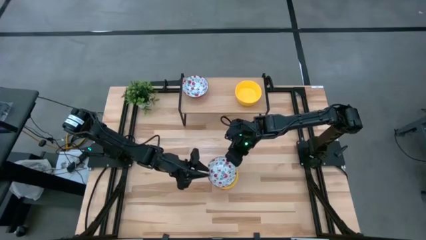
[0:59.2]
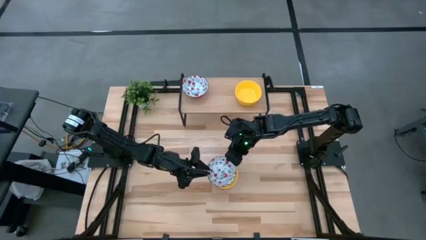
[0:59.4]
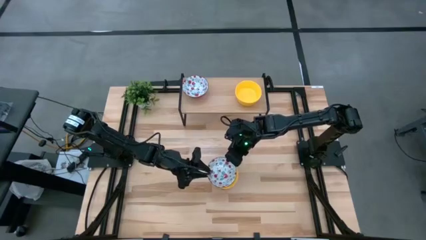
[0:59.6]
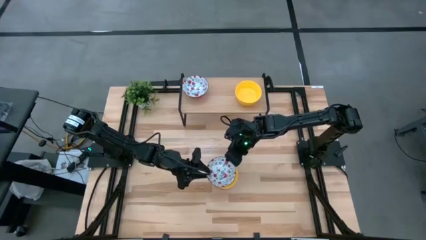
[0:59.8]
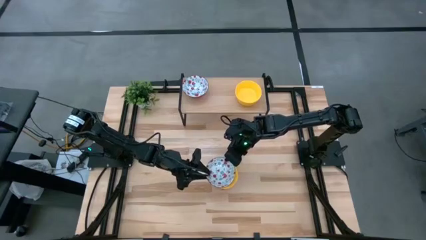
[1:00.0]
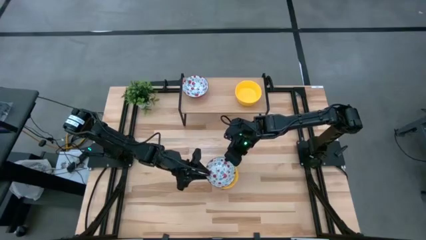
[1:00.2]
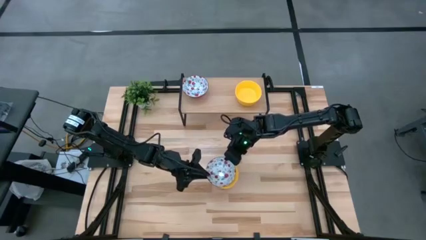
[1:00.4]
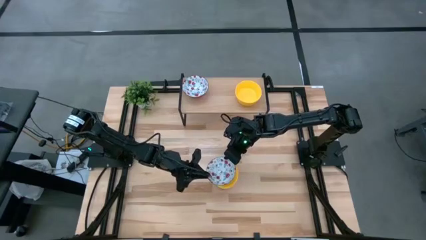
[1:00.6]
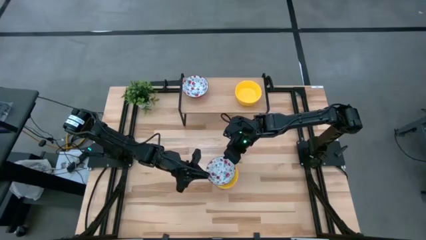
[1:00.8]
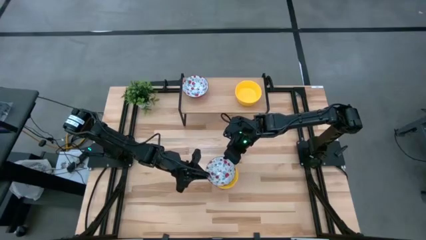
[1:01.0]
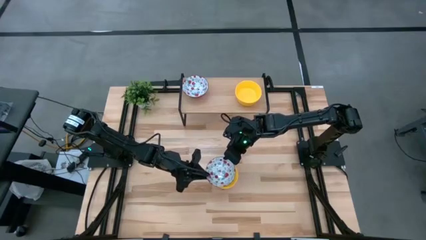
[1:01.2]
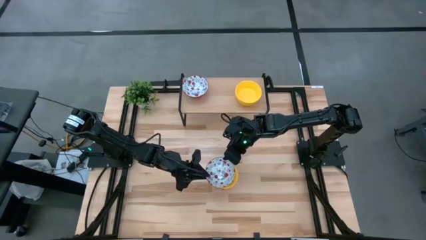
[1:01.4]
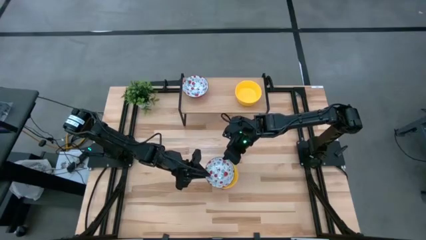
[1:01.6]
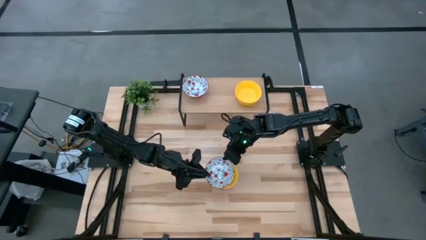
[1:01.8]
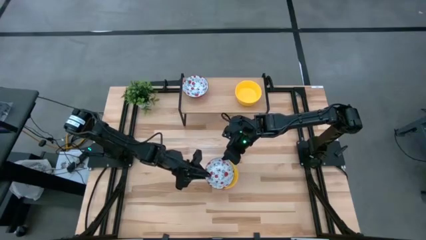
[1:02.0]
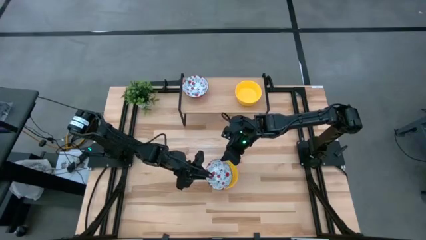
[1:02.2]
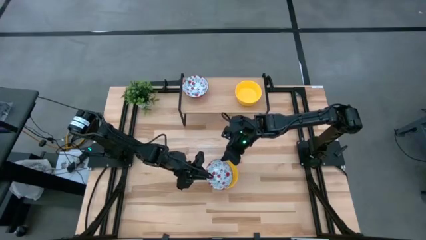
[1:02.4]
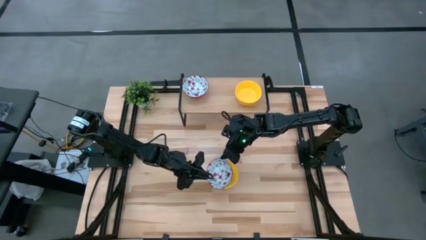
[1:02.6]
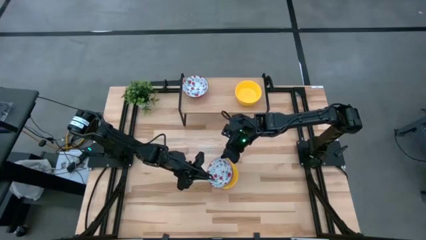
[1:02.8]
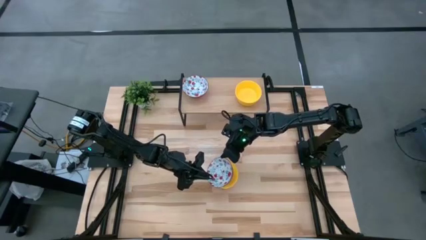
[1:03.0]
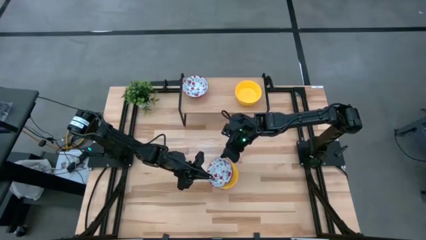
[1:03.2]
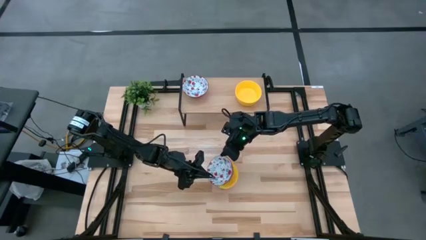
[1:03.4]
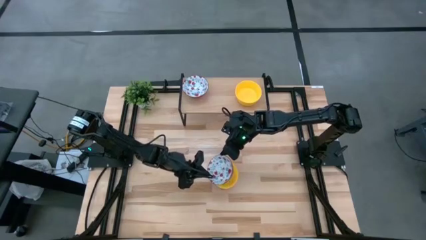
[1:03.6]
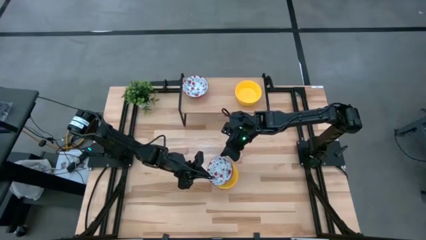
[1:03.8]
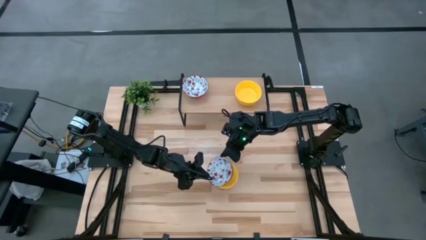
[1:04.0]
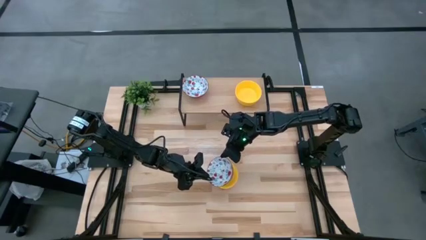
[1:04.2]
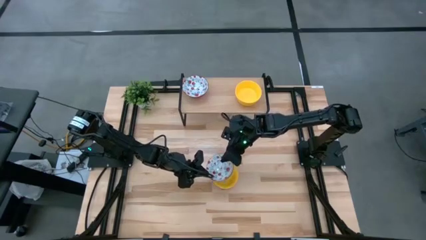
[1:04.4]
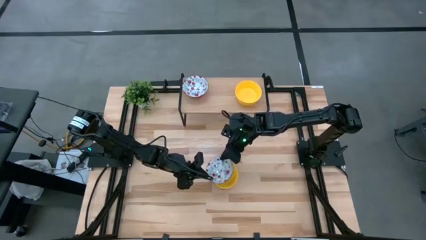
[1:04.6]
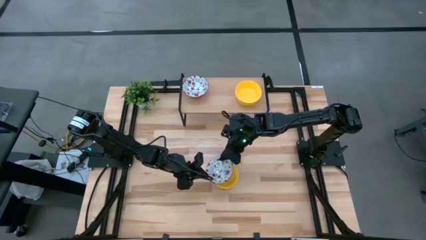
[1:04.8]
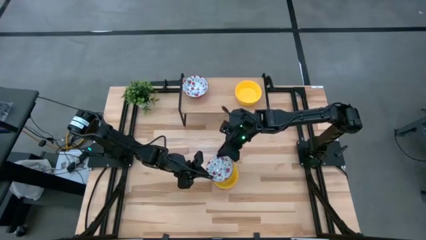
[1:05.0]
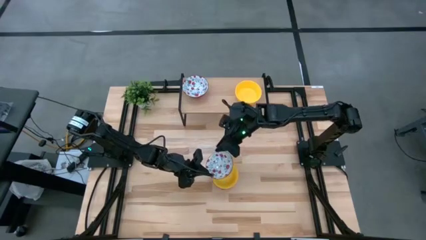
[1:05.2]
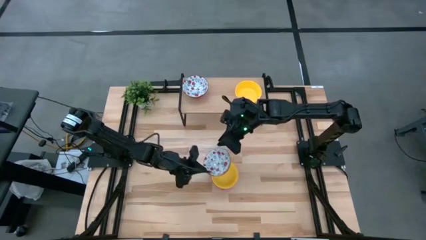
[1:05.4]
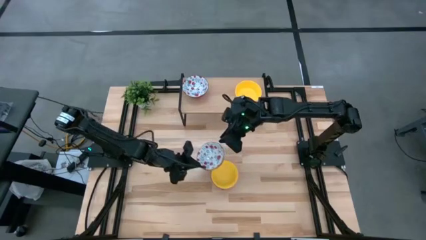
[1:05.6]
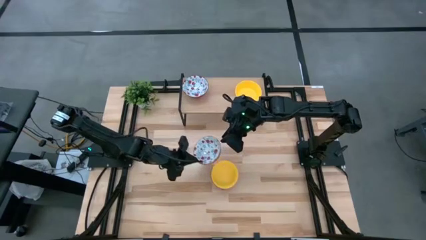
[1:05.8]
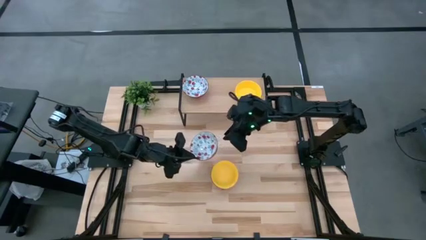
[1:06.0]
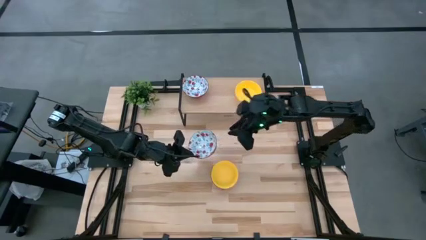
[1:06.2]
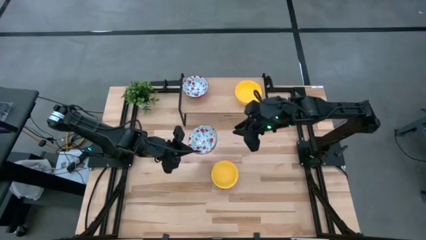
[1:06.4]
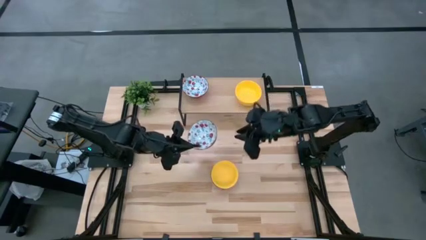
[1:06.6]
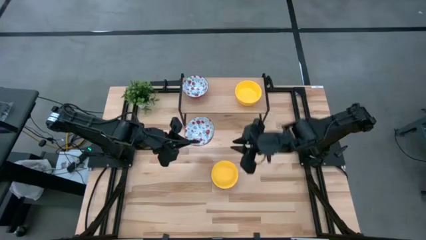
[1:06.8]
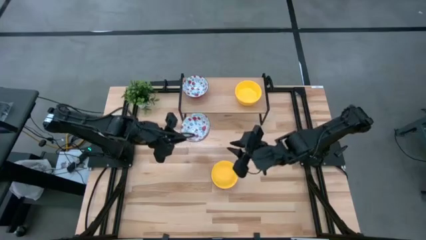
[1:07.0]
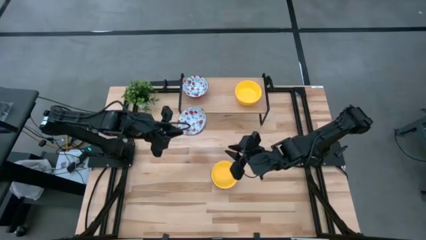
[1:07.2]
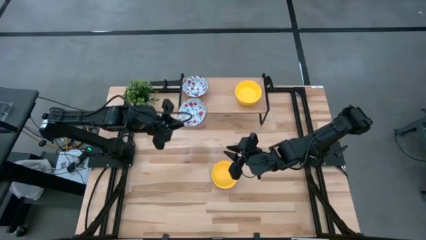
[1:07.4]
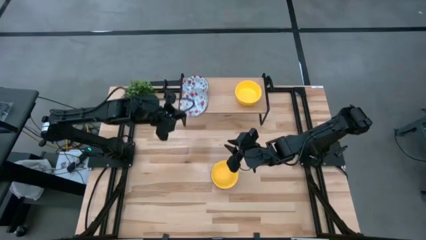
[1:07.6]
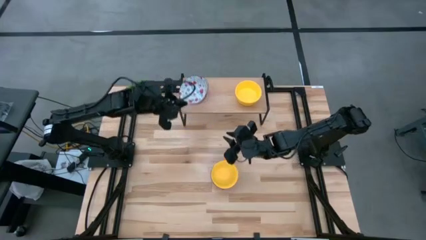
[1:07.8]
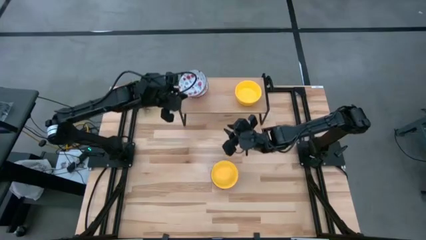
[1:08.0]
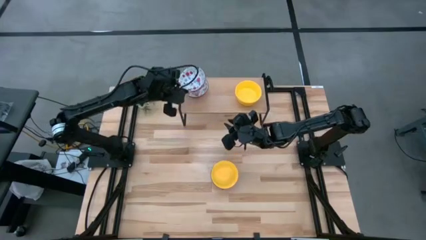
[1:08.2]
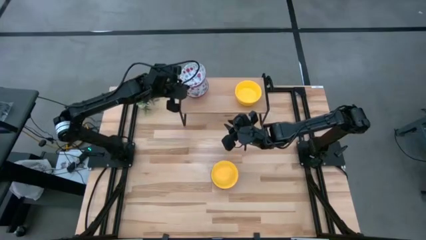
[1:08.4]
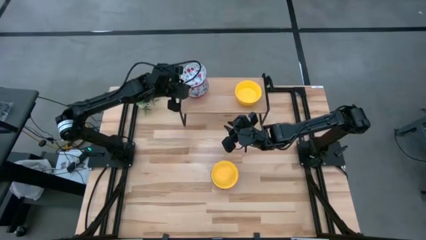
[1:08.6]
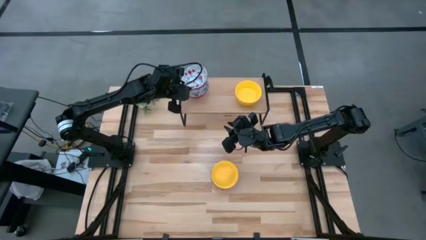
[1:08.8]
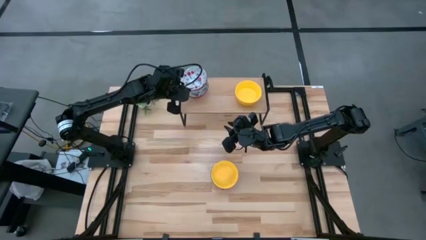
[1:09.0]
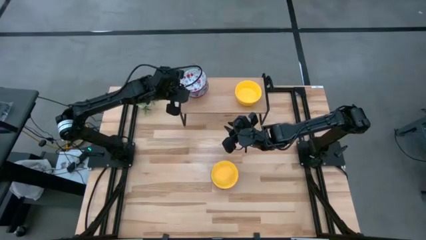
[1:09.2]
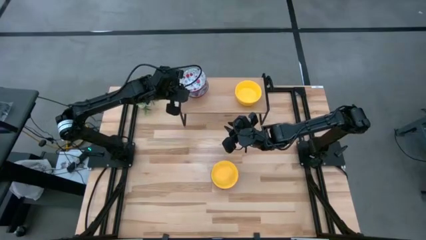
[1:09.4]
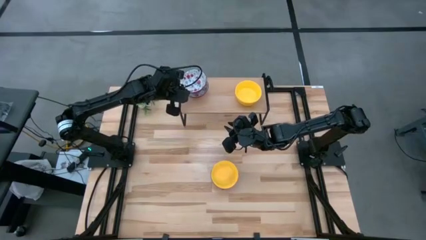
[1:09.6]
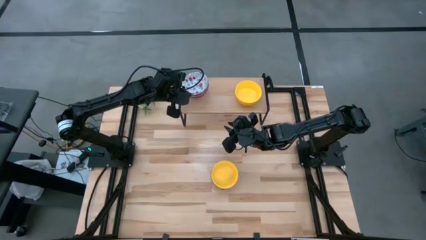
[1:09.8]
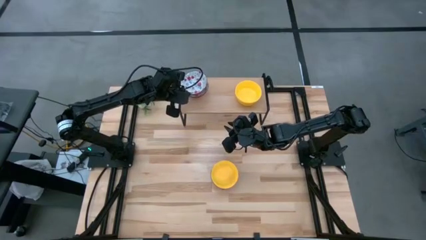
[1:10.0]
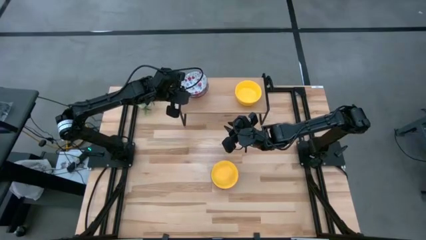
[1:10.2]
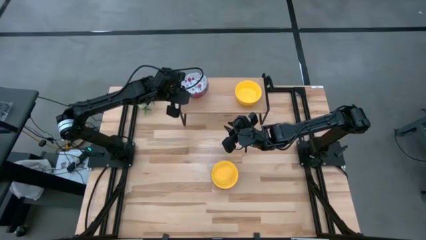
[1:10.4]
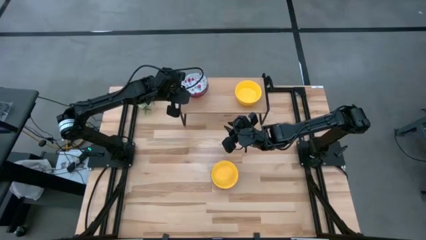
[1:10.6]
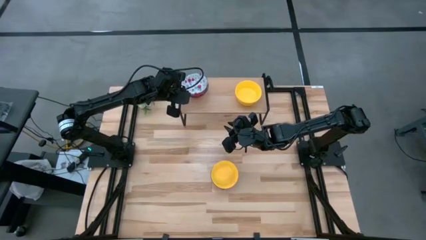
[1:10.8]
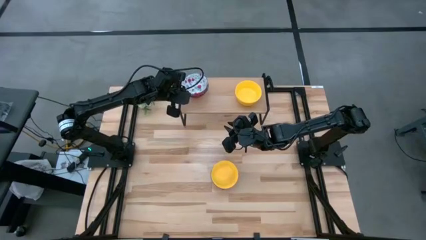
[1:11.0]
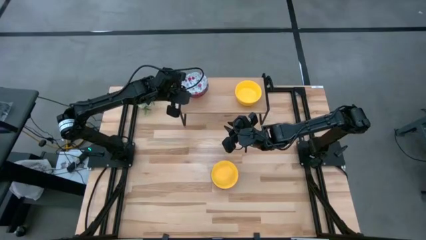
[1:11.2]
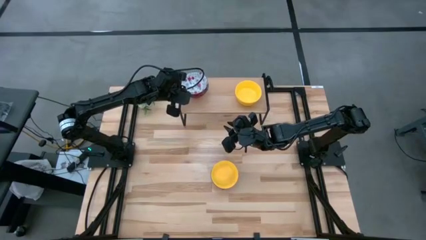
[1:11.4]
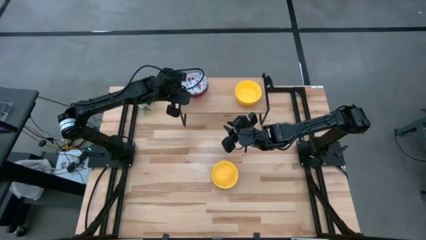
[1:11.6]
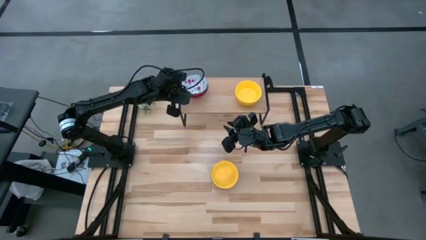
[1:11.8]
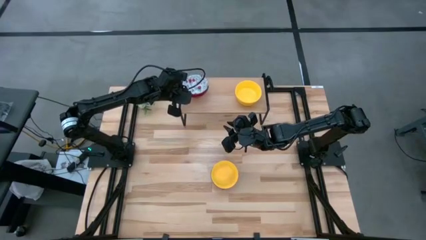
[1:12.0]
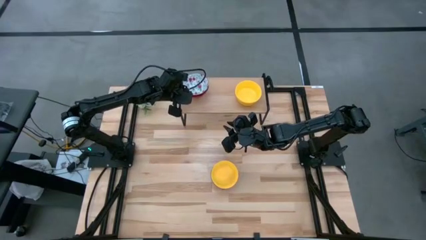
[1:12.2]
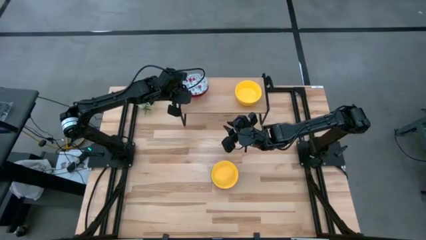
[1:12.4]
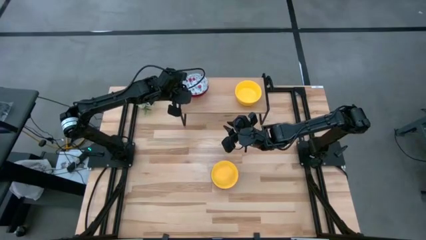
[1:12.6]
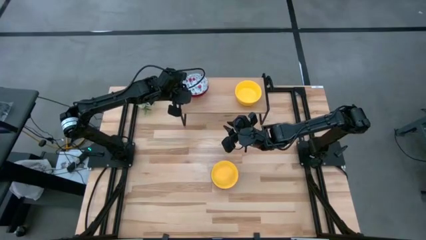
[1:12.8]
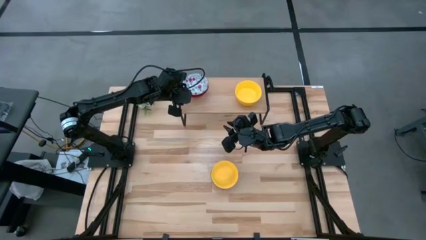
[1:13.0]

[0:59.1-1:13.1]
Task: Pick & Place Mini bowls
Stack the red and blue bowl on top of the other red and blue bowl on the shelf
